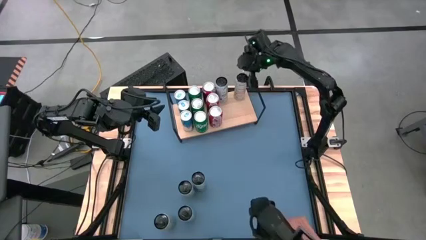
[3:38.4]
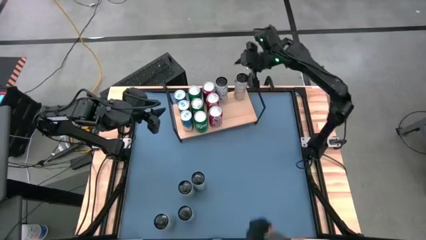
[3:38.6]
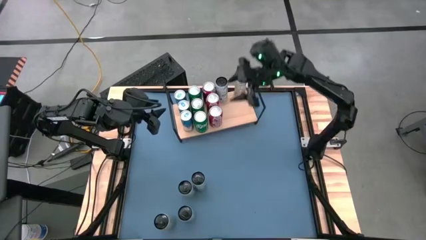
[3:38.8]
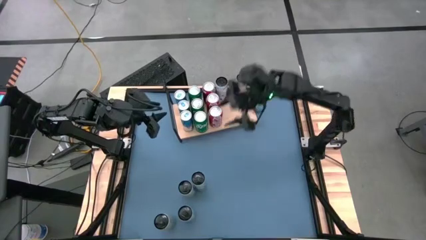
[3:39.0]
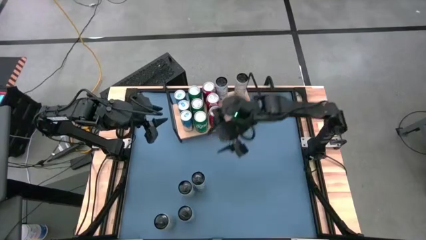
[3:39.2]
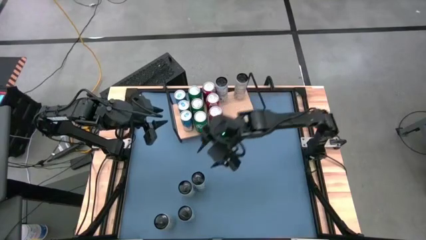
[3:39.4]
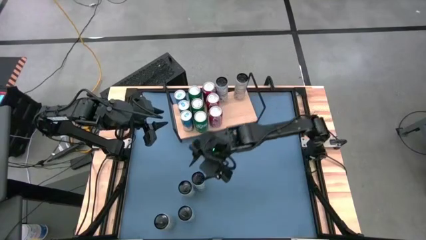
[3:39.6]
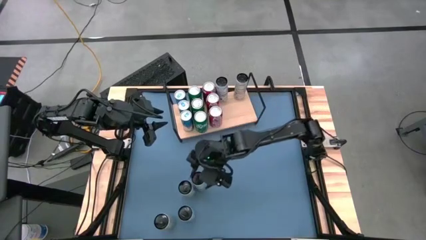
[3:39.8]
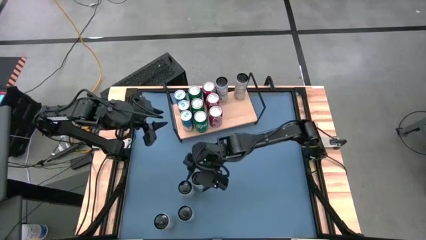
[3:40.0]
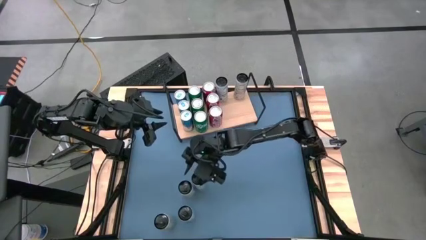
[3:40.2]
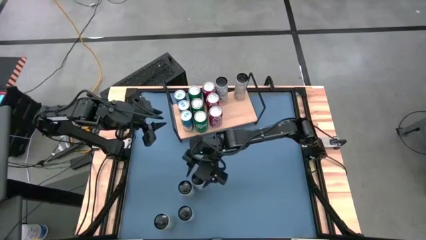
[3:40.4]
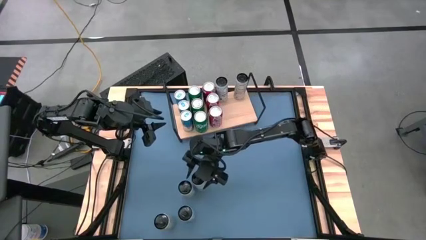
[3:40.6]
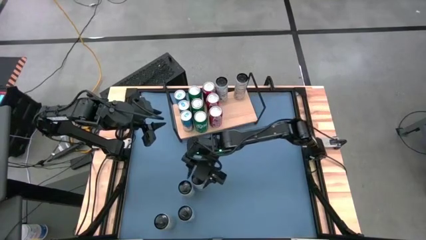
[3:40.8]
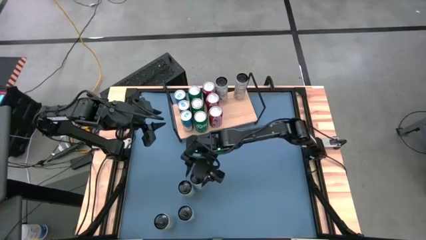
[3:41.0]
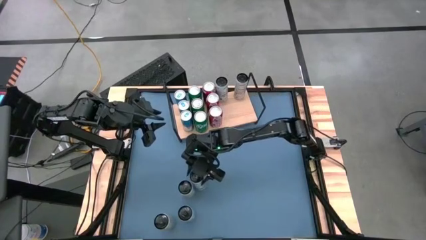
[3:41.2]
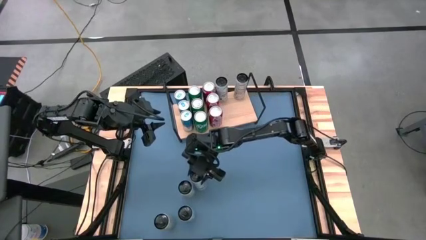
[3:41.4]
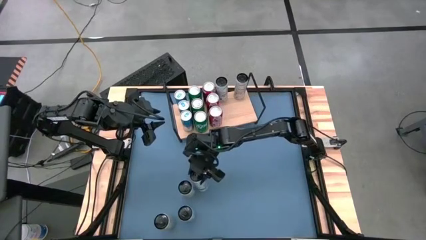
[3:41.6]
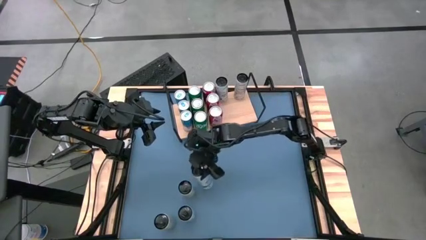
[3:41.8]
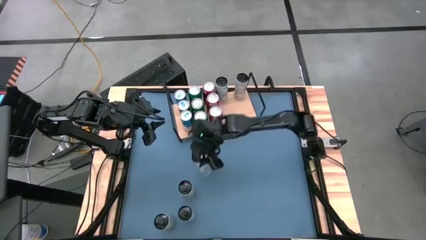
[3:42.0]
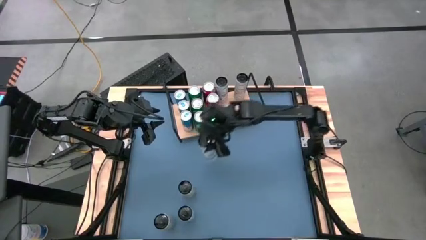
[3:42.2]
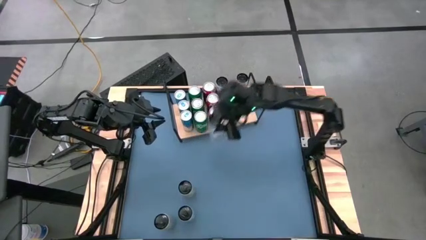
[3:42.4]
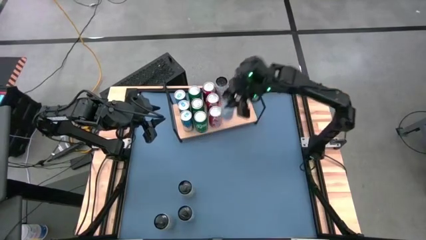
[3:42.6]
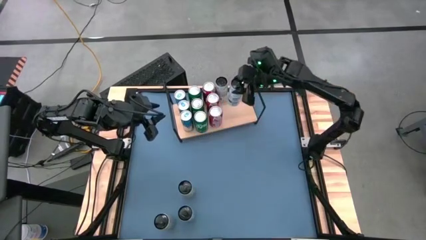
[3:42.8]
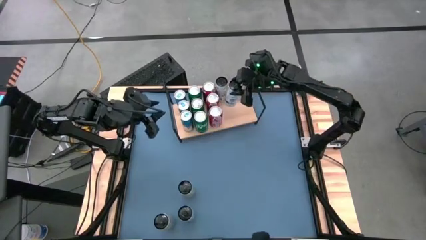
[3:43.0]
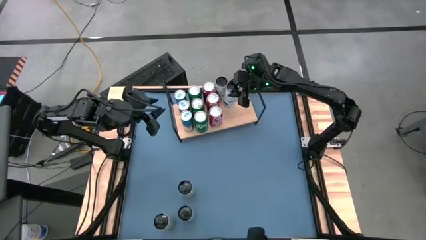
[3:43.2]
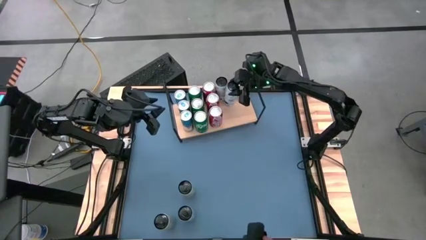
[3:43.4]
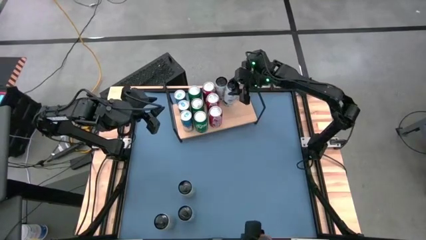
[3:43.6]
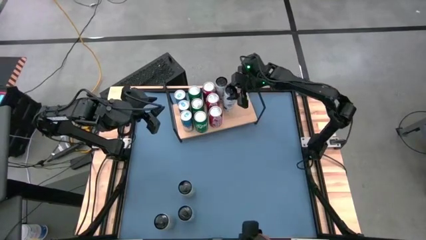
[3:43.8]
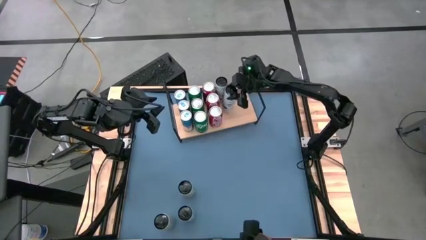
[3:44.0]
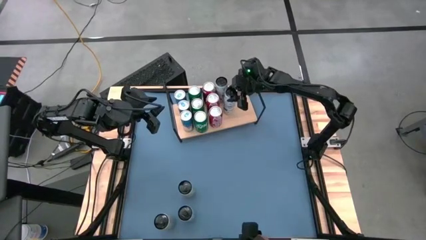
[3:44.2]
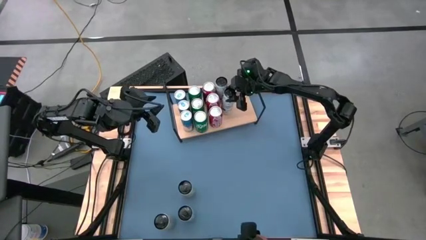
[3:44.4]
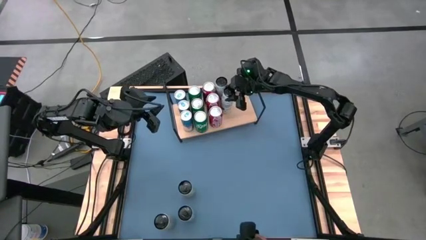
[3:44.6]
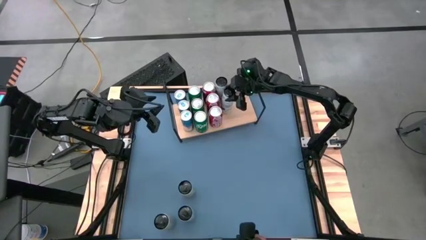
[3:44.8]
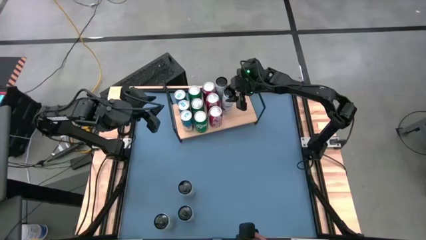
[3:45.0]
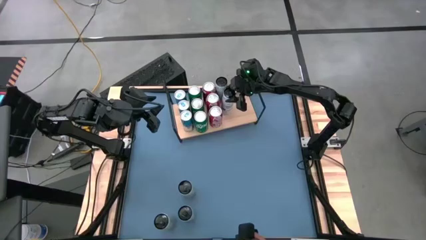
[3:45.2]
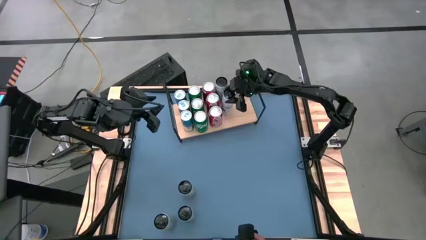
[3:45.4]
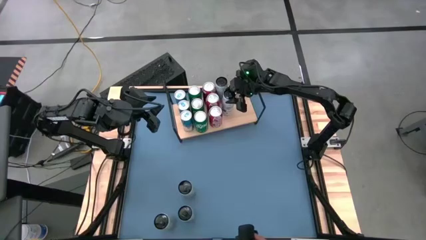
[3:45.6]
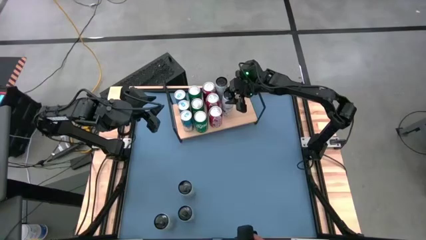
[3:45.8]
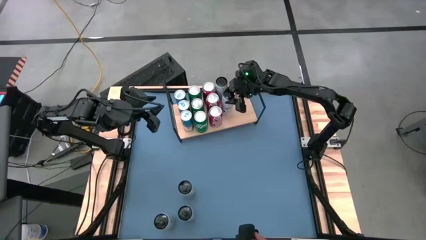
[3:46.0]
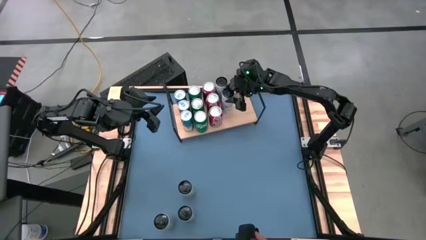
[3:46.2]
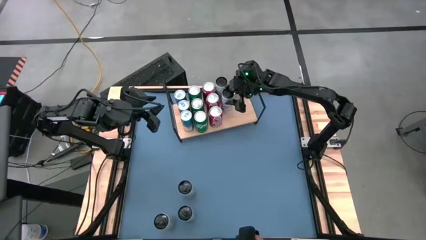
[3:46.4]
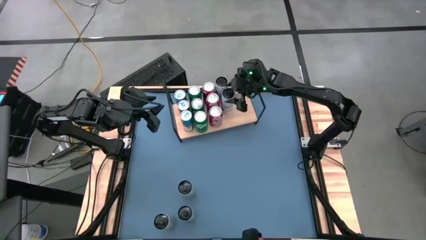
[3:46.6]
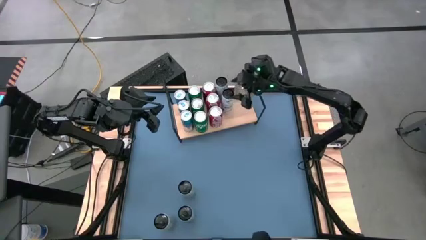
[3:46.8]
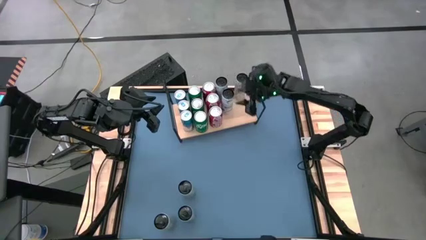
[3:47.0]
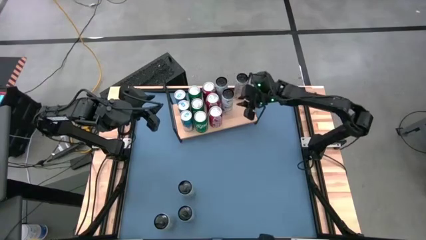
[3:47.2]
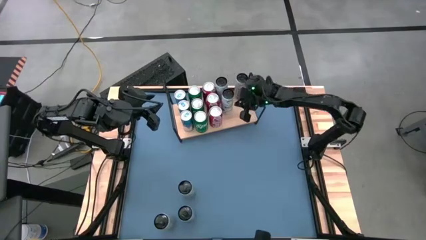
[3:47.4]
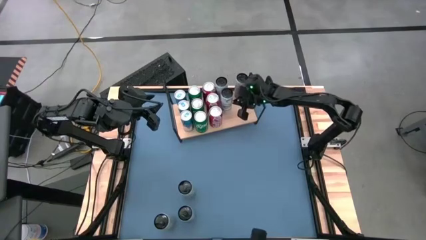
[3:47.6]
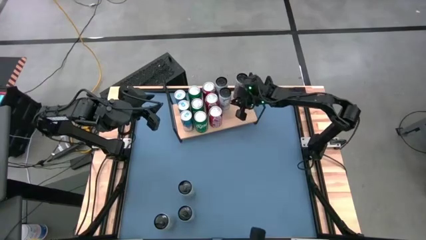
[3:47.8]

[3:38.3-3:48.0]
Task: Place canned beverage on shelf
Put the top white blue soda can on the shelf aligned with the other white blue soda can

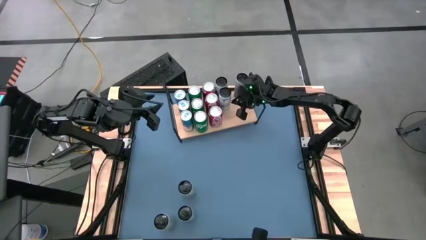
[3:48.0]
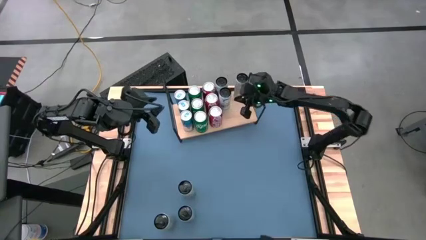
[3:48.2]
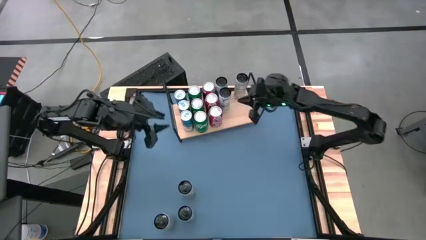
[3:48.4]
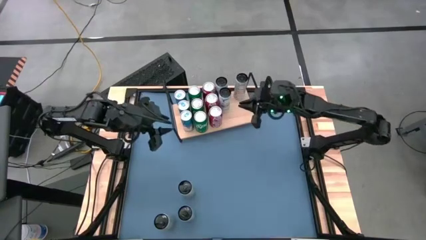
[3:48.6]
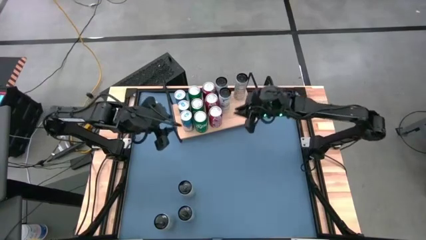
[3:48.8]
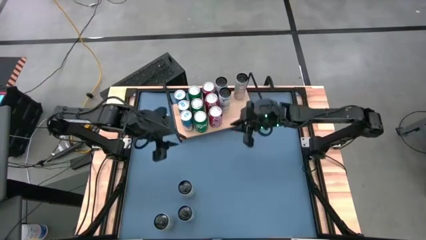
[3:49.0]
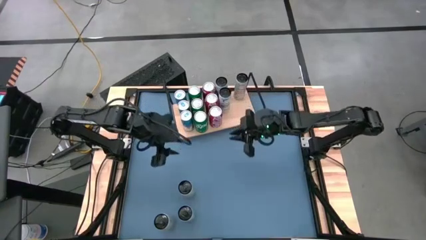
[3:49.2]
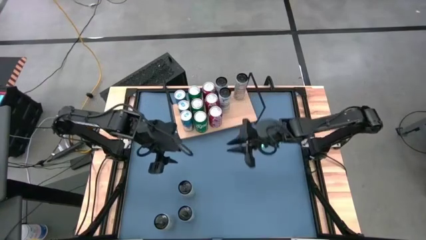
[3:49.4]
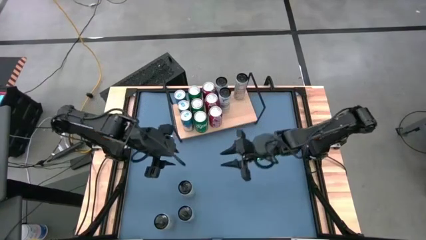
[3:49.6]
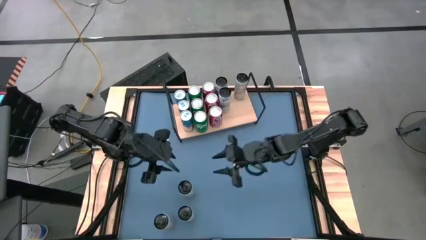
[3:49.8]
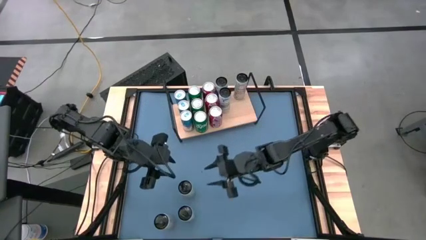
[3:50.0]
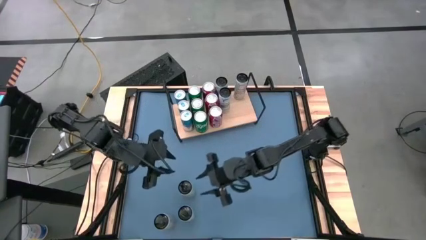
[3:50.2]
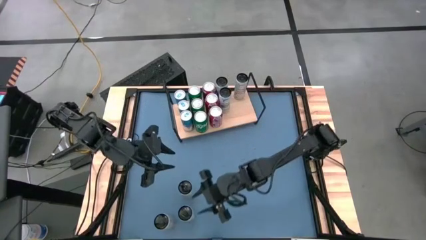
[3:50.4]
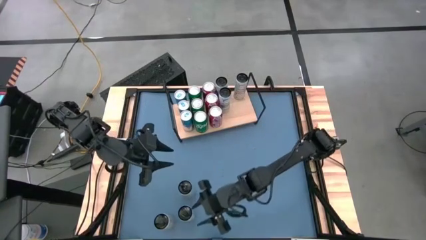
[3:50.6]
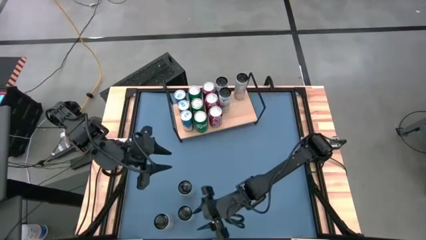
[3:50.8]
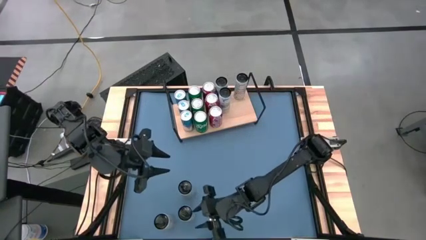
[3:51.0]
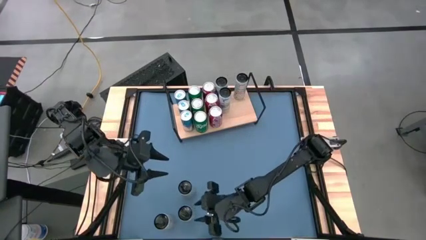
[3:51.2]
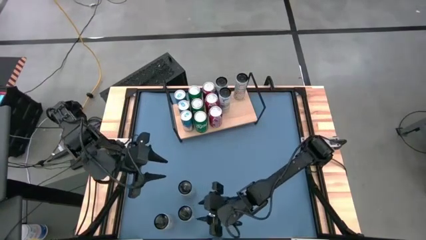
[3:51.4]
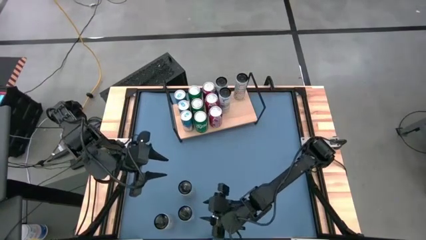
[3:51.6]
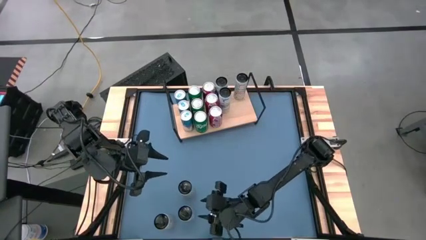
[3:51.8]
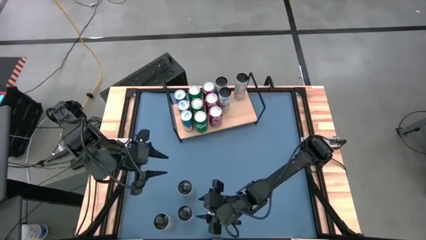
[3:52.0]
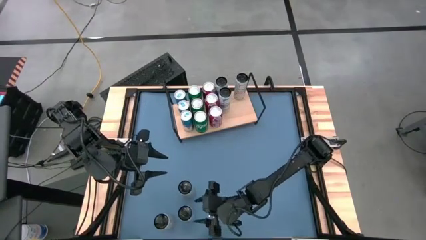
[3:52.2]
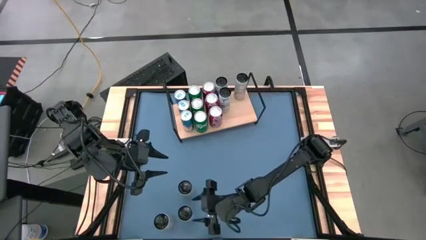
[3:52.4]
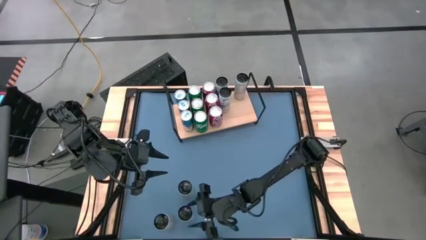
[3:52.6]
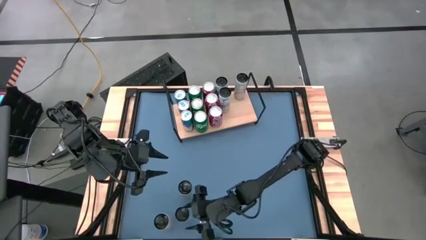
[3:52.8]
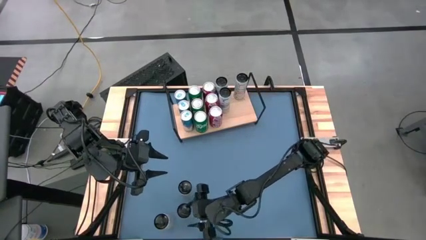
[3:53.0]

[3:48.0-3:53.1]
Put the white blue soda can on the shelf aligned with the other white blue soda cans
